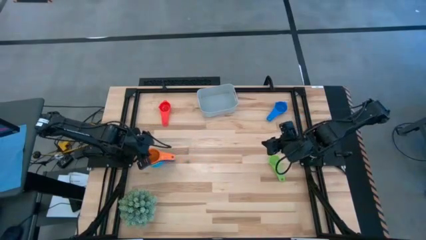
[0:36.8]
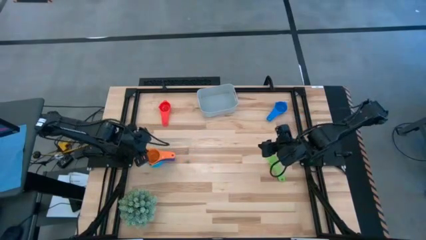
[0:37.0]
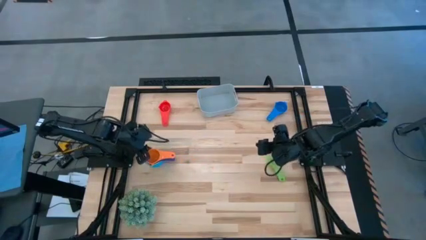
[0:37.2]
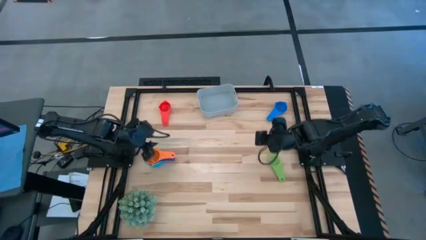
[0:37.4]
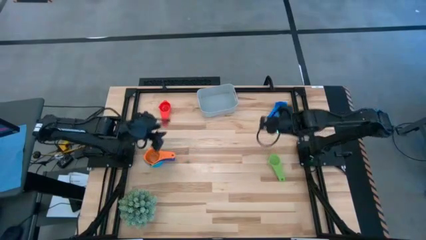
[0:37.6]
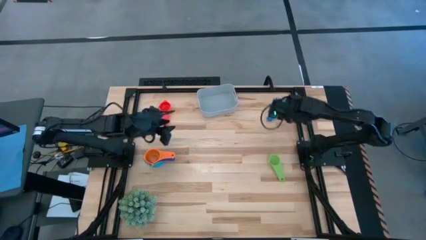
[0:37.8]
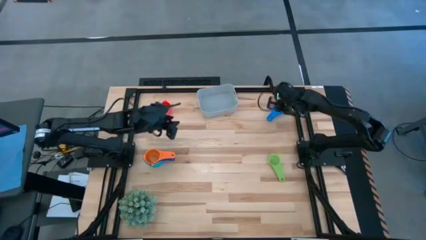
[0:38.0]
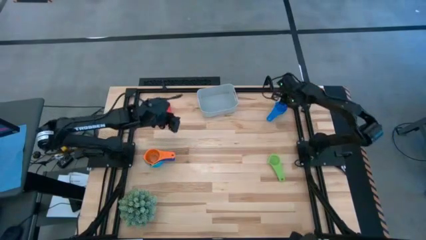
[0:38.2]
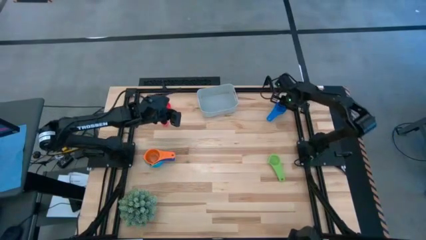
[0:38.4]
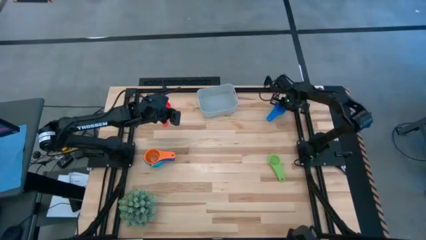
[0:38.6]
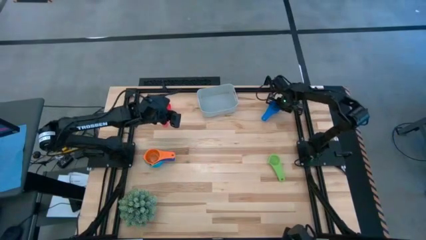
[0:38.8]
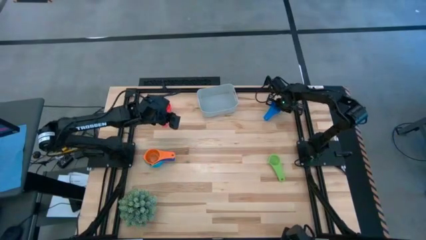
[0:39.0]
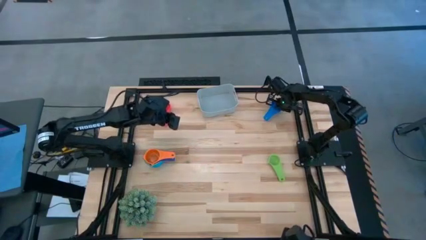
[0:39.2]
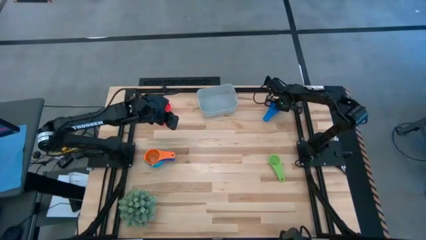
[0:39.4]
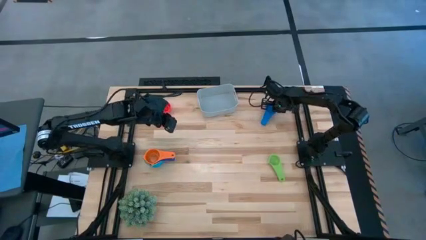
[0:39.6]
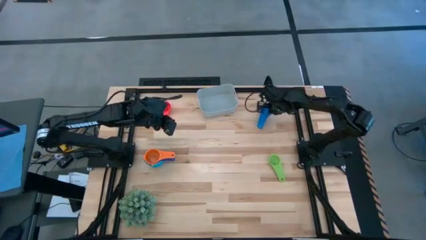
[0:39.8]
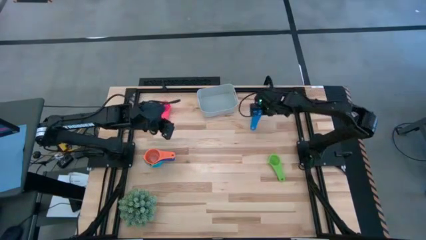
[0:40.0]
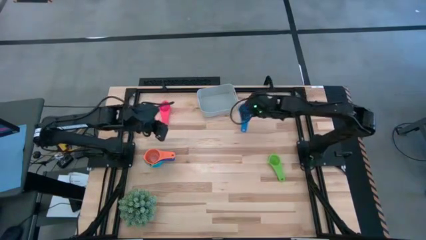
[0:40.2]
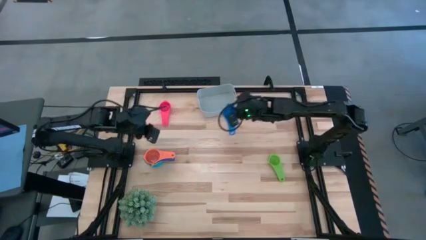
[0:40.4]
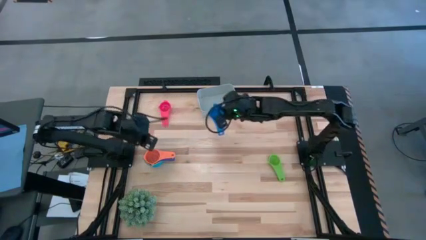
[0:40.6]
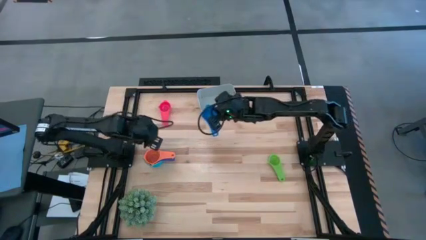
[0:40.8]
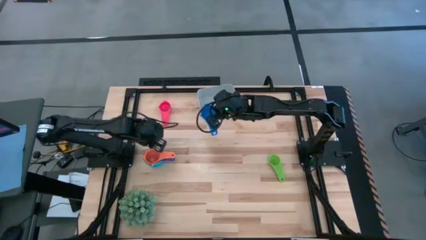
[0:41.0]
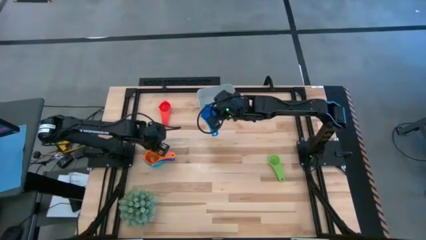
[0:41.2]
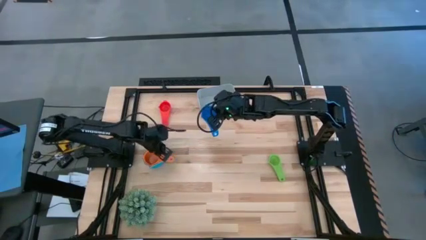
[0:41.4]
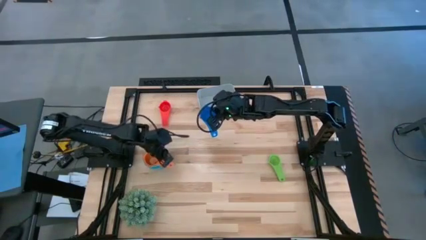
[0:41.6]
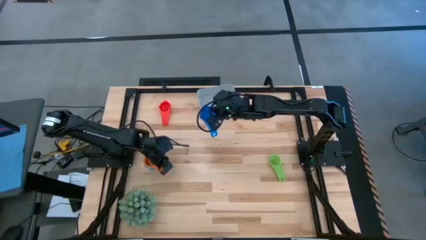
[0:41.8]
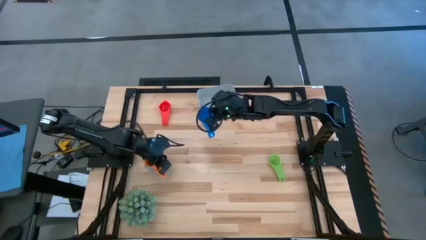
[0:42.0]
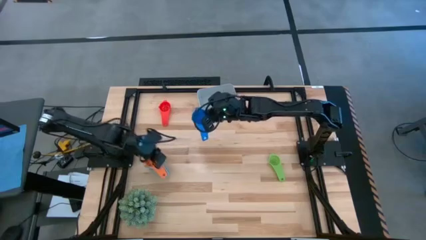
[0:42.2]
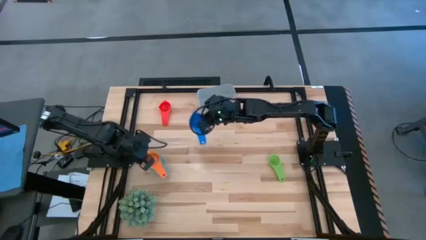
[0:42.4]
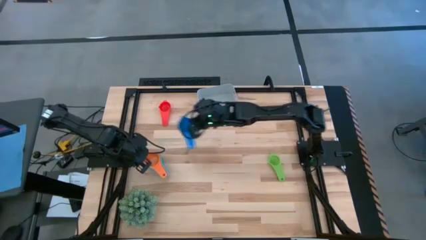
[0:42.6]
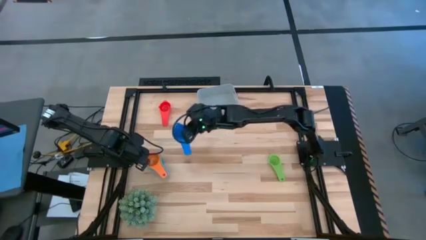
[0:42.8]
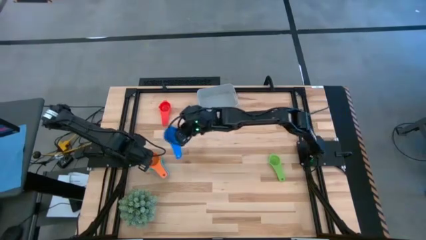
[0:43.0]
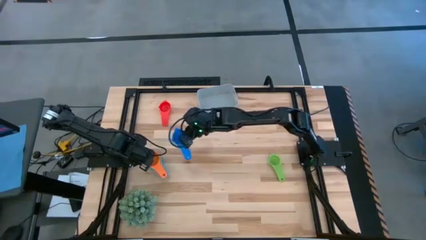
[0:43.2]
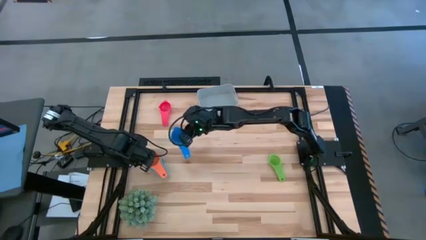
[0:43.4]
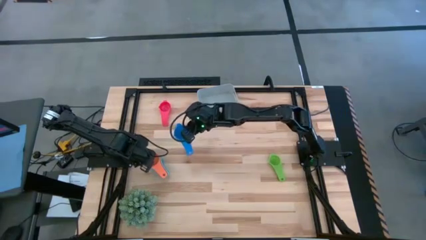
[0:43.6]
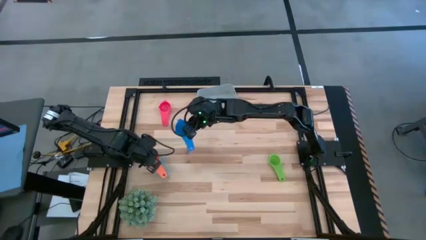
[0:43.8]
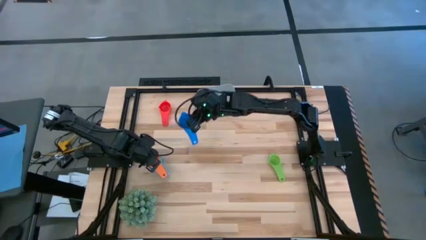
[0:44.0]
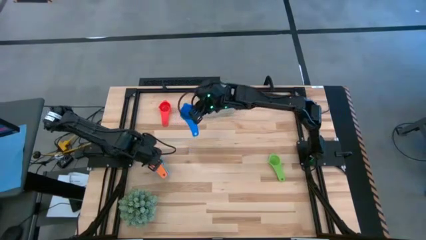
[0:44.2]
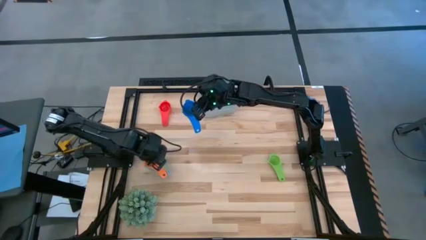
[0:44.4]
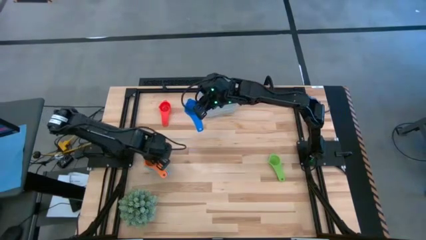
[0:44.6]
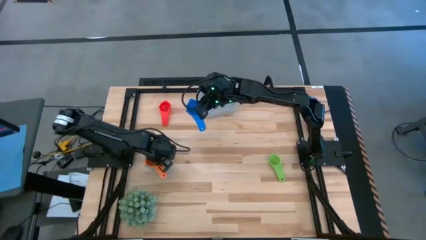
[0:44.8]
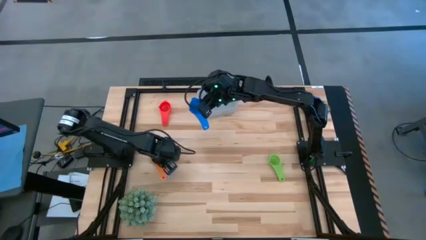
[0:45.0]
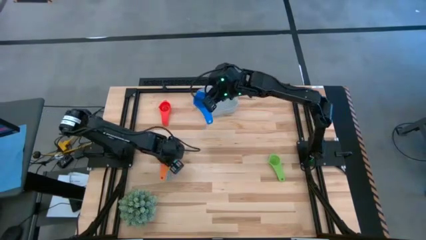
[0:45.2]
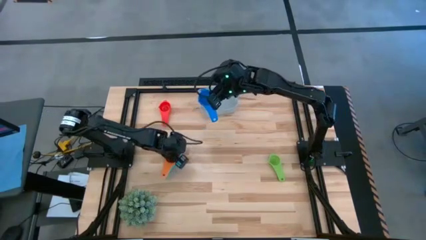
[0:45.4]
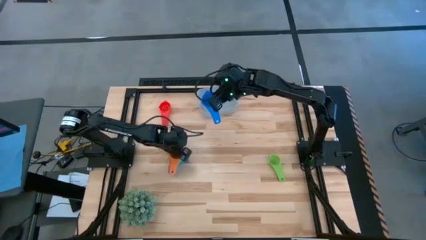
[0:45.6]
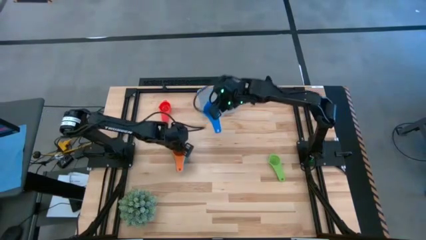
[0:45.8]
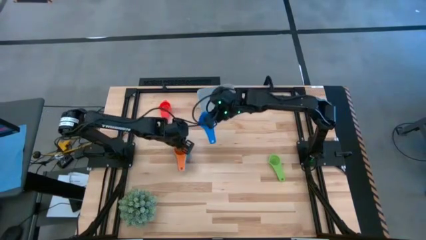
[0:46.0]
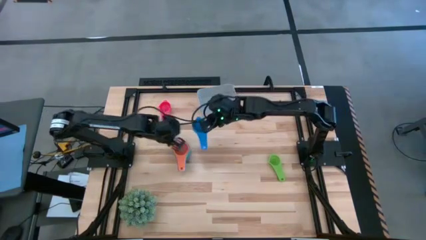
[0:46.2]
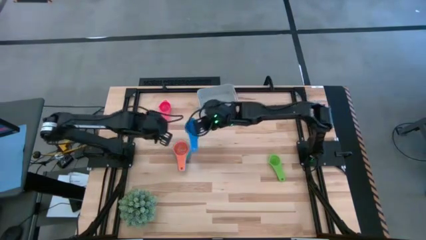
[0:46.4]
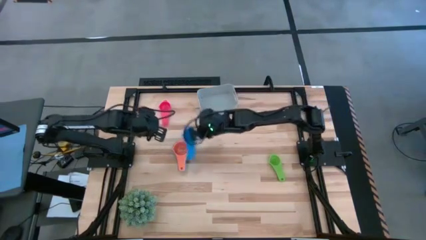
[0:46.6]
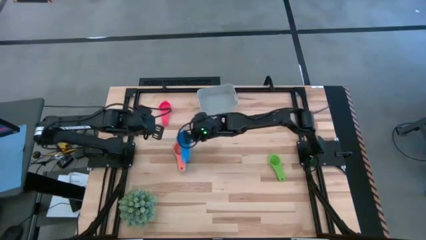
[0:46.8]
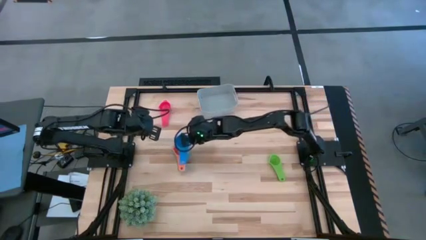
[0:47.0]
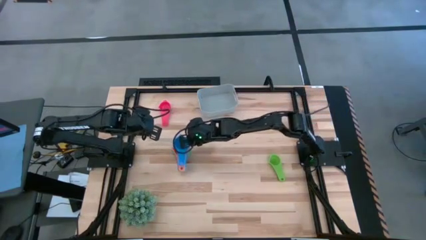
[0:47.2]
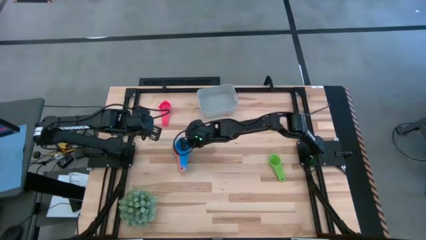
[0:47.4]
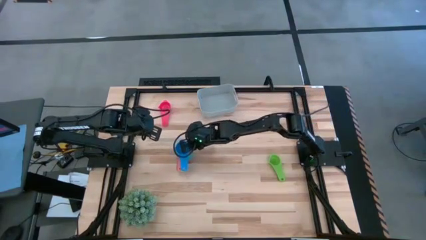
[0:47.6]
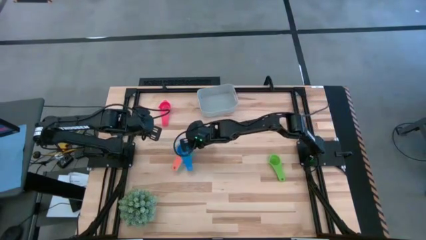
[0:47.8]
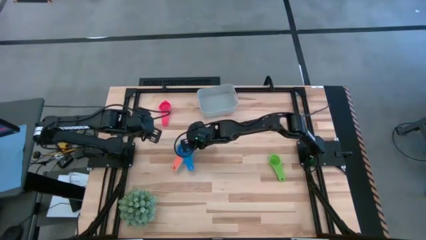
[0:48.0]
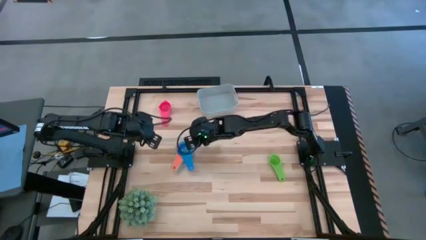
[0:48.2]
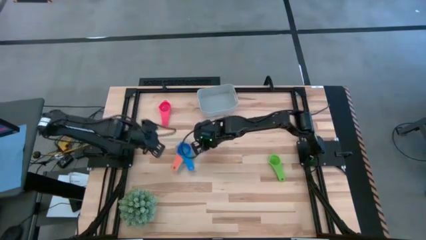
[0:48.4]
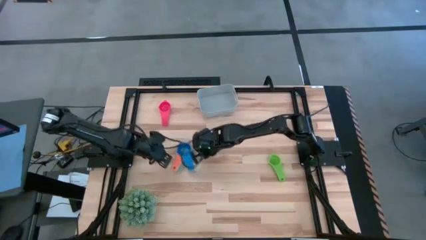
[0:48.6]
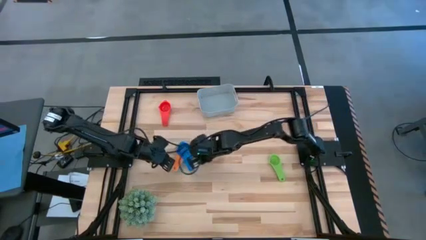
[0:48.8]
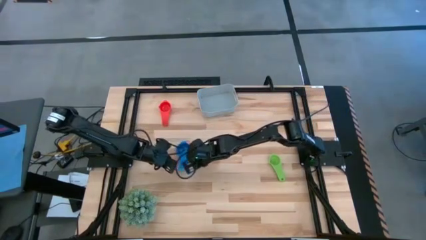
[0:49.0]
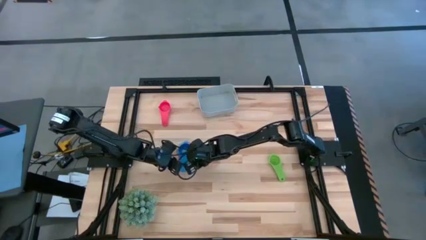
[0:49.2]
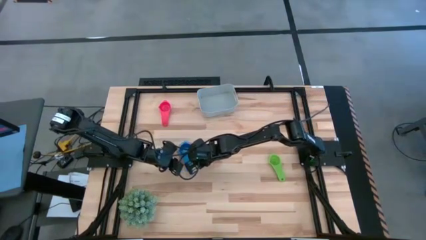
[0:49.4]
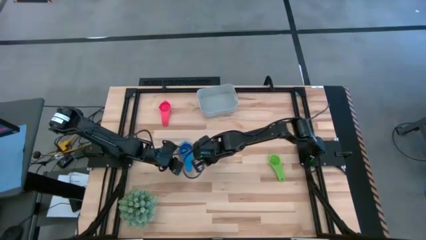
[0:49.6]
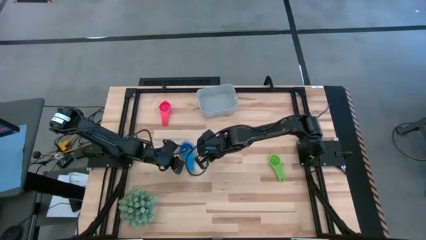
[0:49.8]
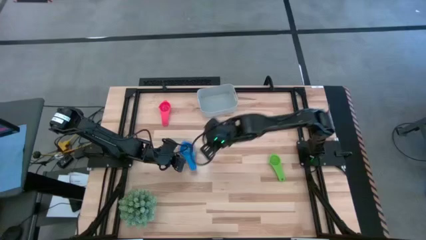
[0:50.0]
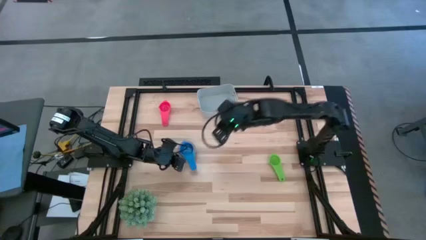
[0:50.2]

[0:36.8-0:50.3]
Task: Nest measuring cups in basket
Stack the blue measuring cup on the orange measuring cup

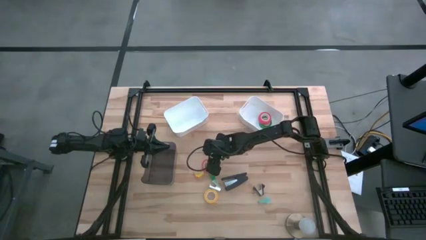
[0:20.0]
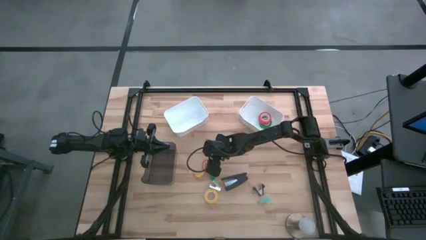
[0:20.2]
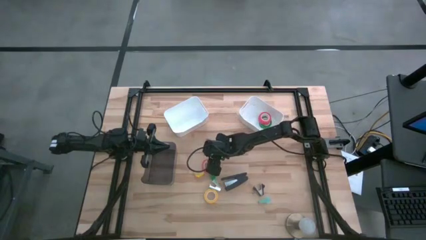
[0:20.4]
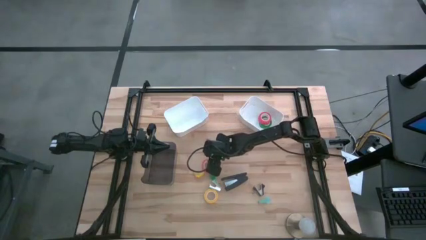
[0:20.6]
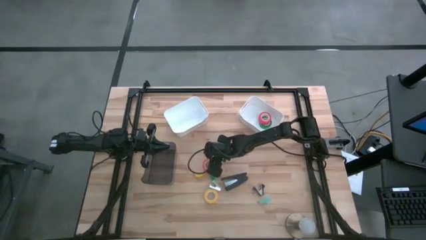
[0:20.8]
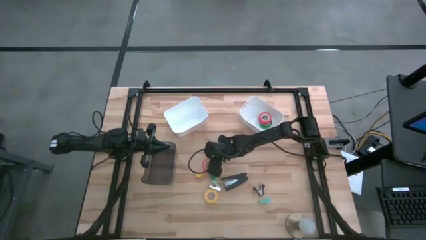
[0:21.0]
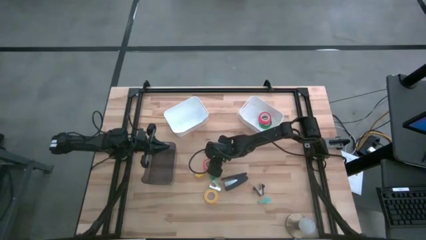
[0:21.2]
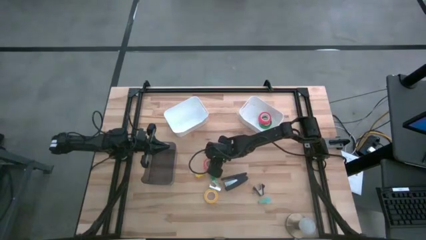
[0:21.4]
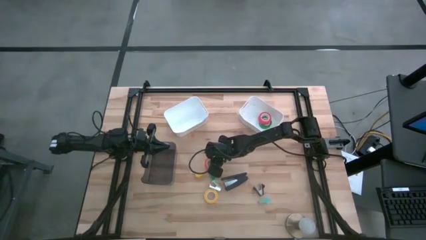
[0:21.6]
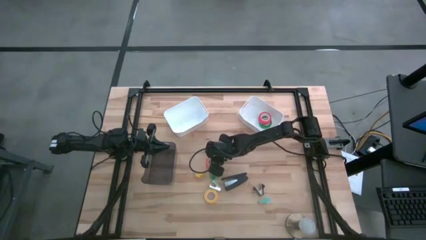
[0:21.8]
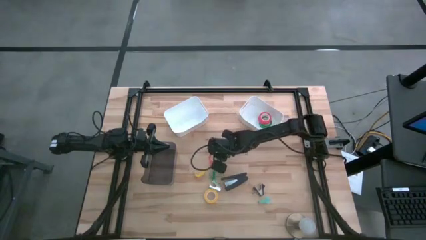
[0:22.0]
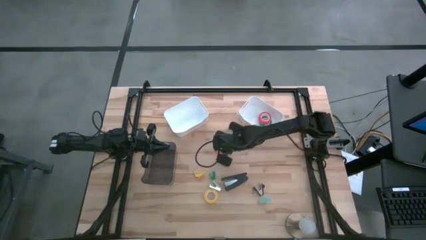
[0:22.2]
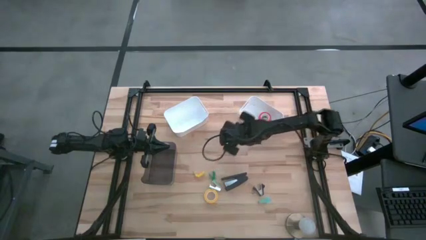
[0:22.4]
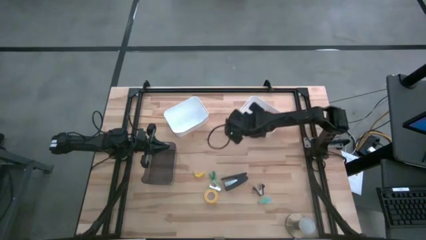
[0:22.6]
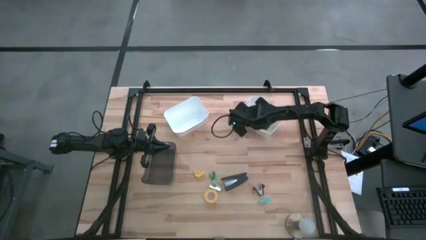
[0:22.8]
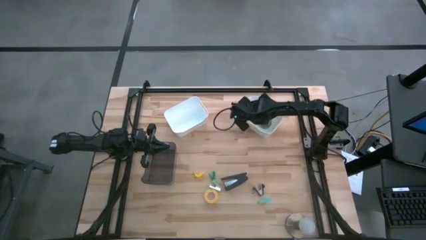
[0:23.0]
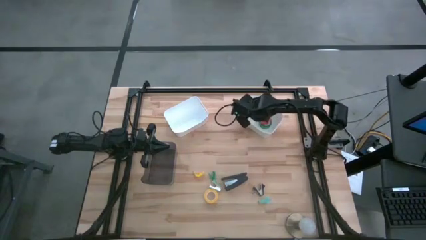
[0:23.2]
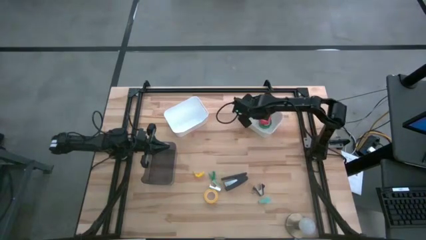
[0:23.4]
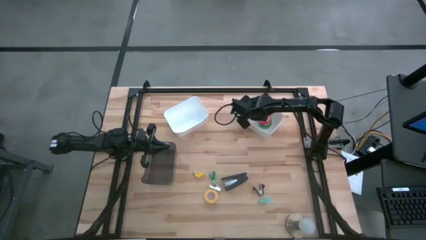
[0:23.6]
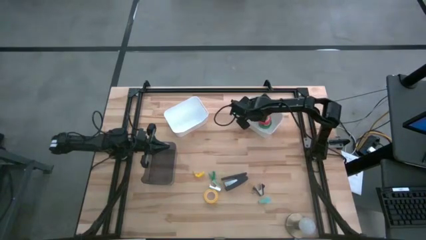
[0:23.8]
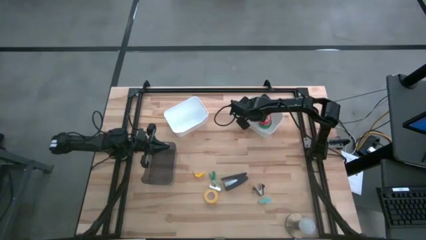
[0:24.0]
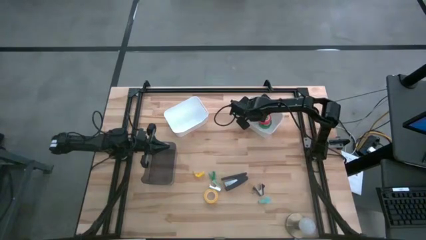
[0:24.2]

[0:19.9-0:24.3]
Task: Pick and place Stapler, Stapler remover, tape
Put the orange tape into the right white bin
